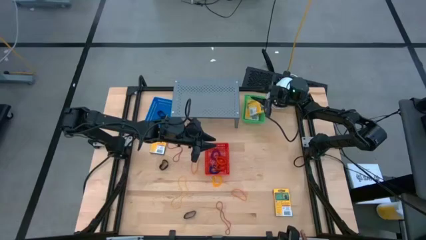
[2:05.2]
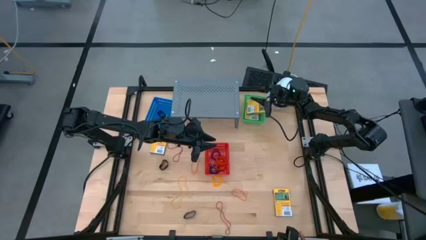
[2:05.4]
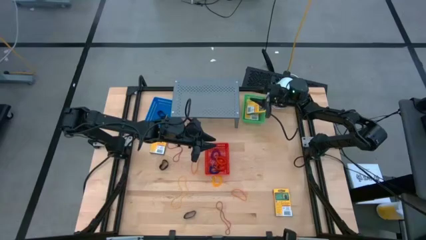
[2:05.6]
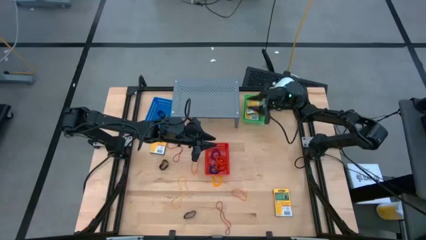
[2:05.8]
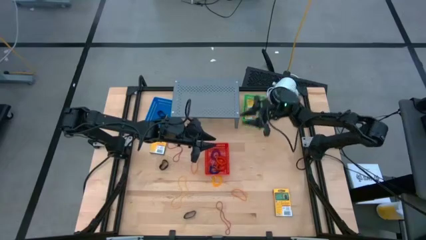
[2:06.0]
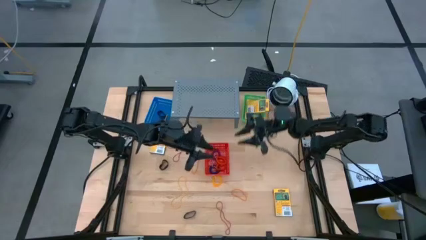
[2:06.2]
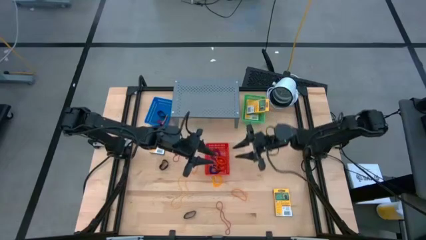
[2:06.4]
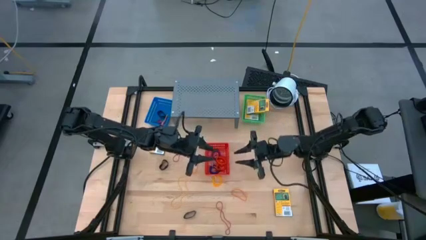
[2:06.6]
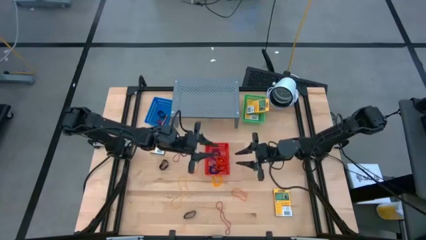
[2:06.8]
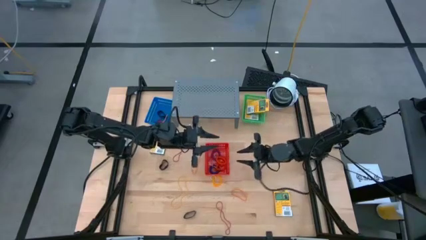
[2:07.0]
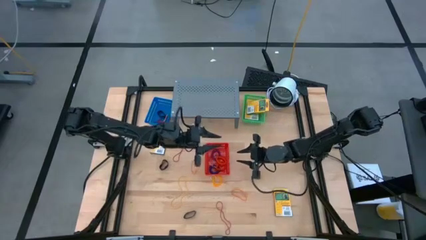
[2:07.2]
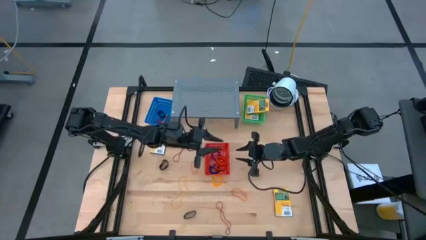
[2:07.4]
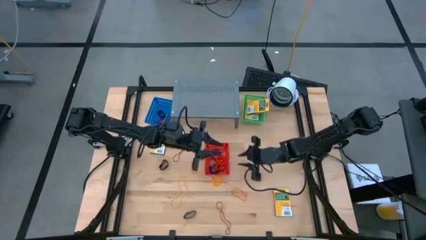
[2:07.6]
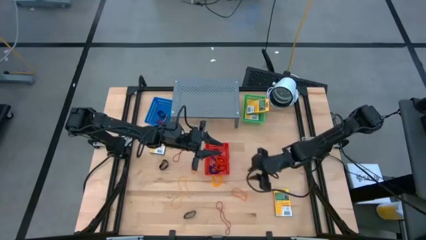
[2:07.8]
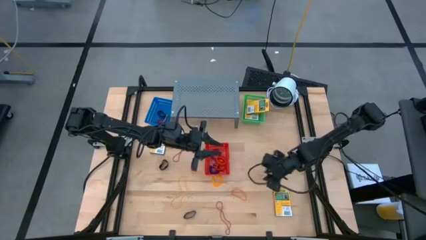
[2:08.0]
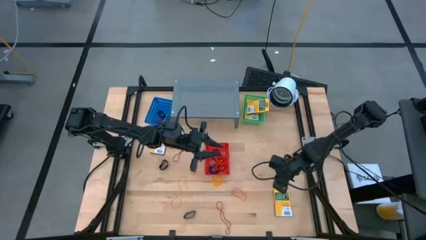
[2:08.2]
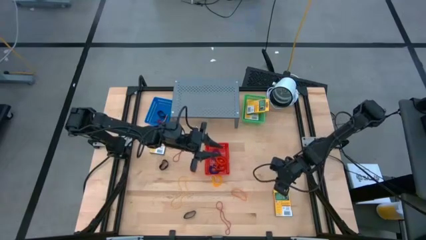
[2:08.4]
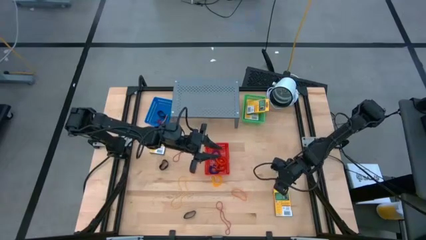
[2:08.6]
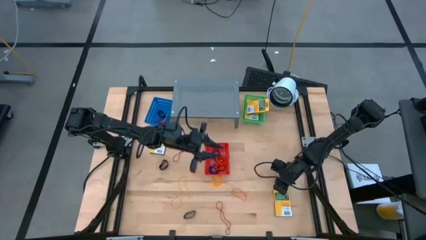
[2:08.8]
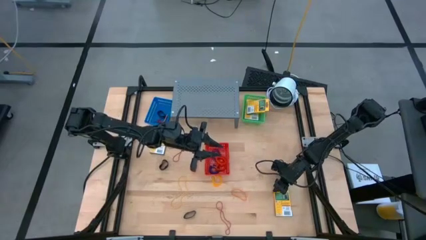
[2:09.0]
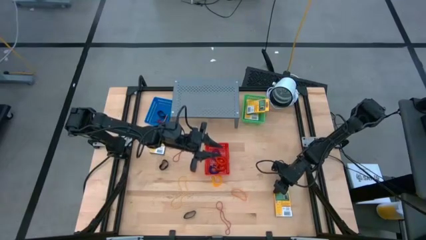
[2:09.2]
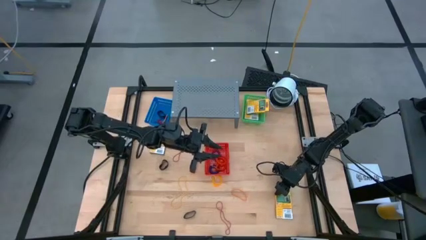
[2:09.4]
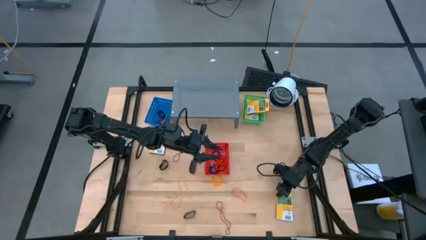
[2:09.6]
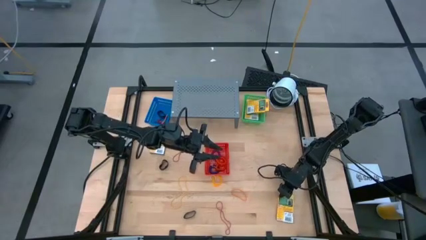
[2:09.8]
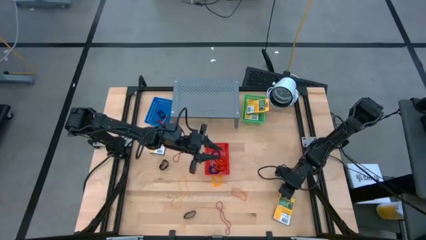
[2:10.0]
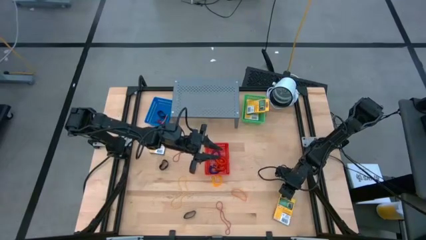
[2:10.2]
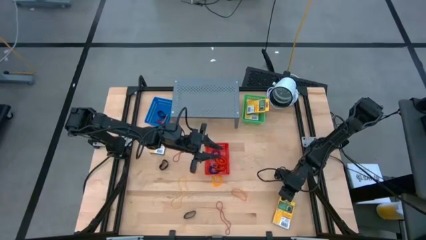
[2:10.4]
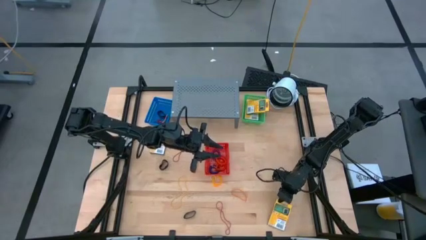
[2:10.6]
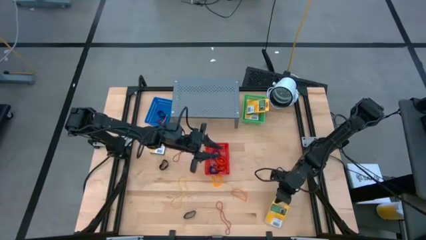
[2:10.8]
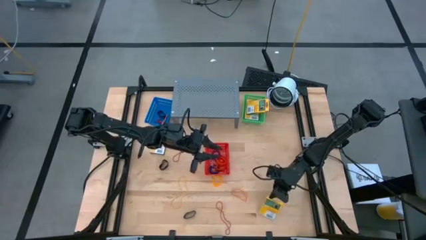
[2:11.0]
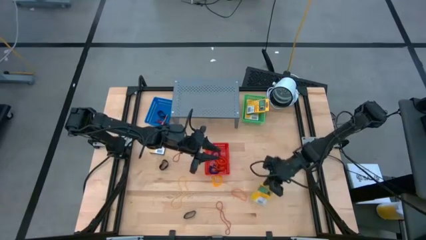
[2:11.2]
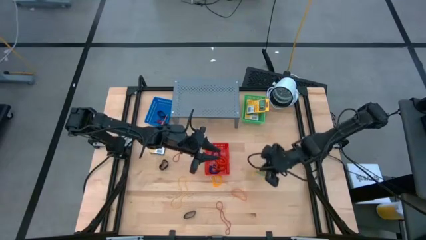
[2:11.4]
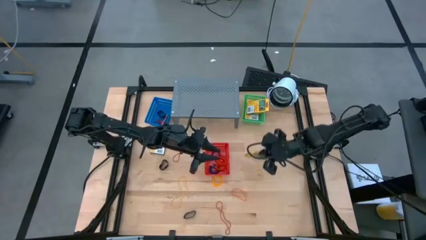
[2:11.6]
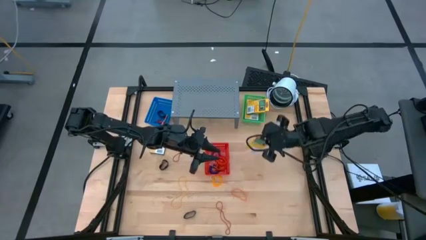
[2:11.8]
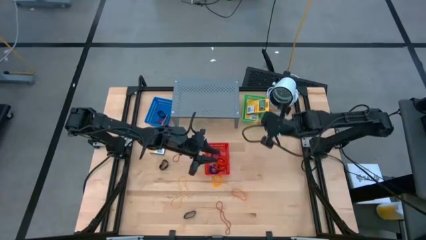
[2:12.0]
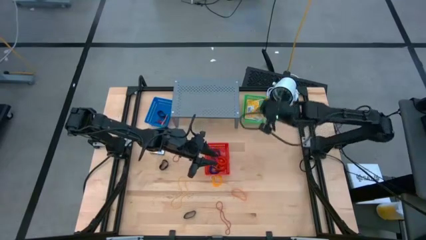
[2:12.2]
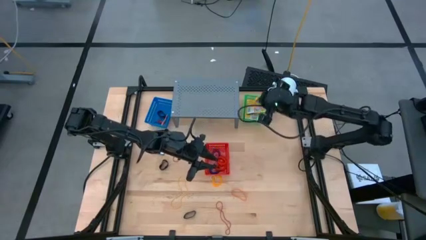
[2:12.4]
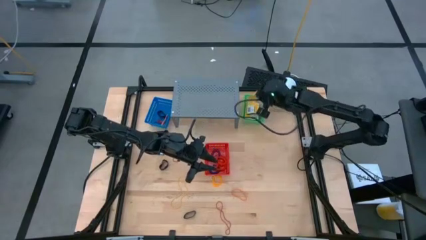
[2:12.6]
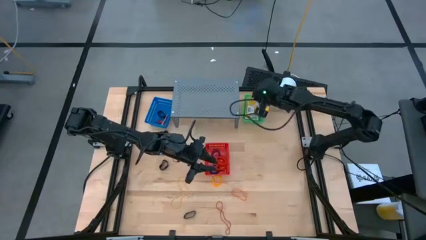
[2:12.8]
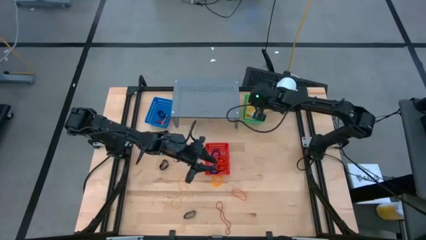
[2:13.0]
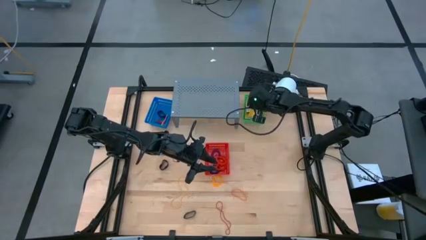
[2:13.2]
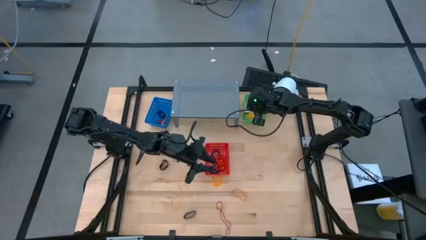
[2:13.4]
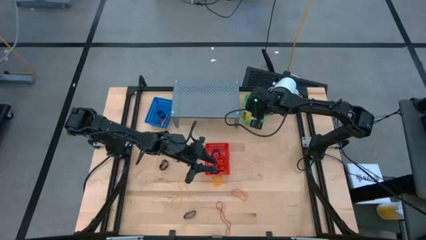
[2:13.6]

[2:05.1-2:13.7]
Task: Pick & Place Office Desk Supplies
Put the bottom right yellow crayon box into the green basket

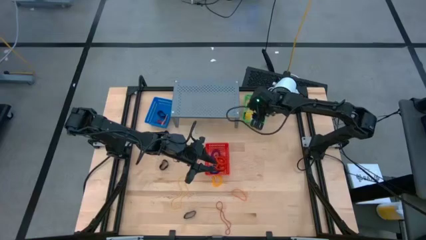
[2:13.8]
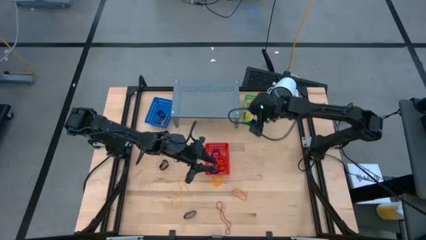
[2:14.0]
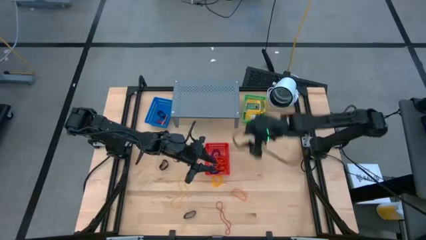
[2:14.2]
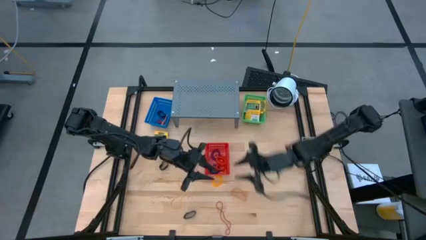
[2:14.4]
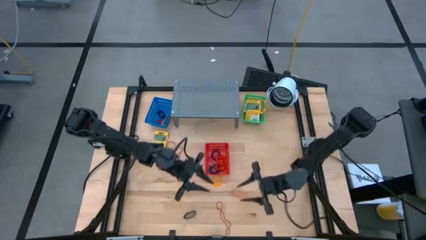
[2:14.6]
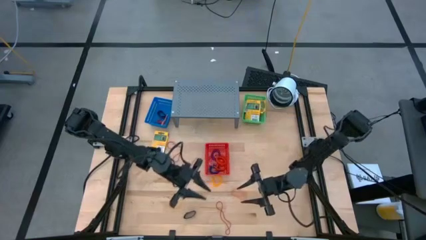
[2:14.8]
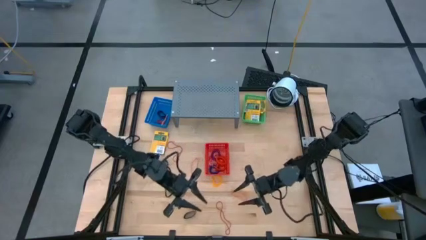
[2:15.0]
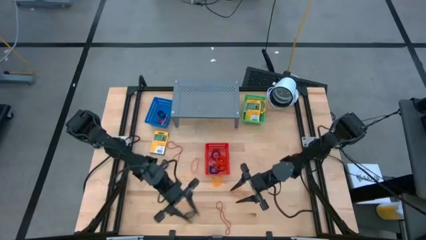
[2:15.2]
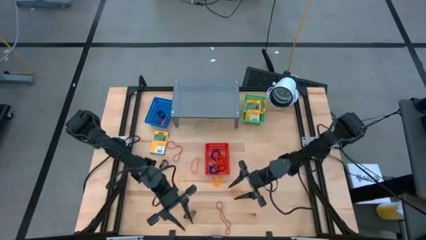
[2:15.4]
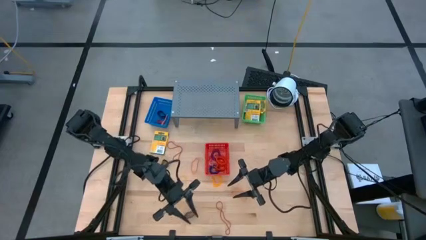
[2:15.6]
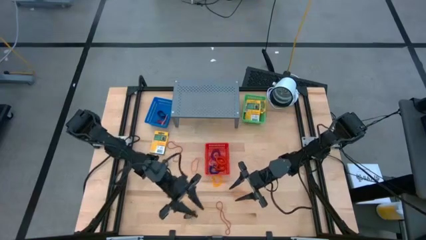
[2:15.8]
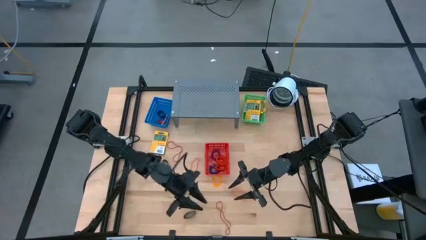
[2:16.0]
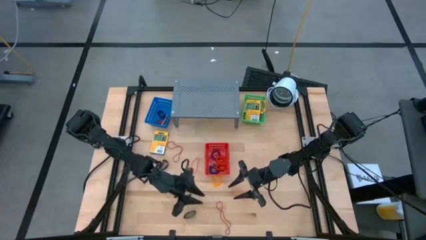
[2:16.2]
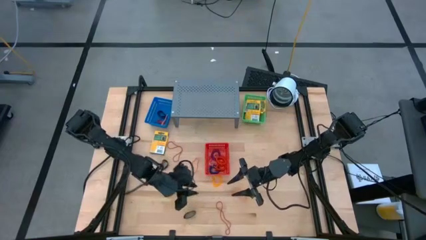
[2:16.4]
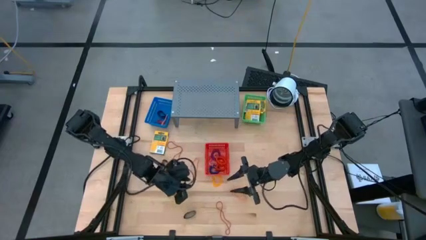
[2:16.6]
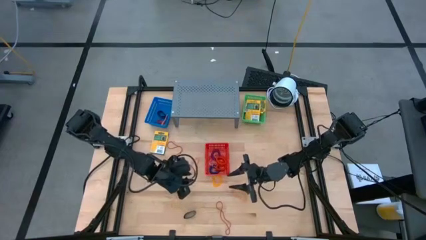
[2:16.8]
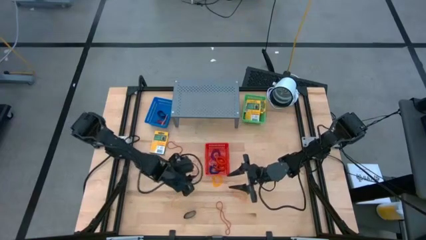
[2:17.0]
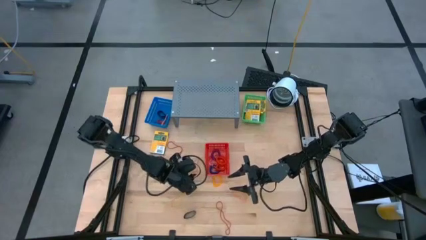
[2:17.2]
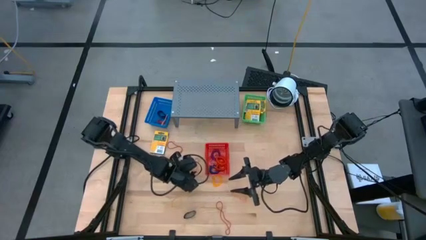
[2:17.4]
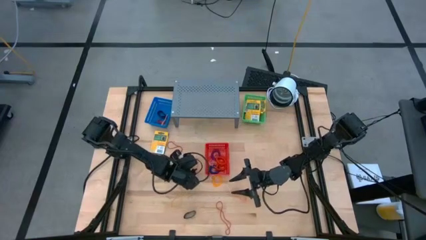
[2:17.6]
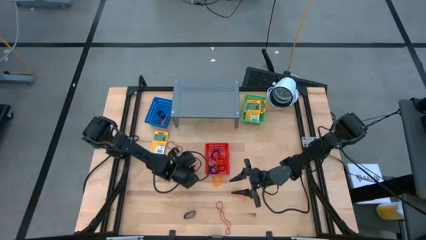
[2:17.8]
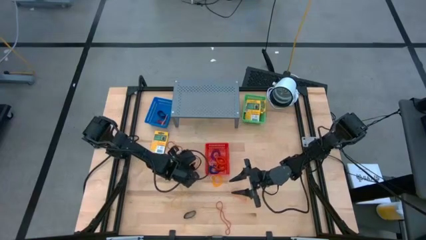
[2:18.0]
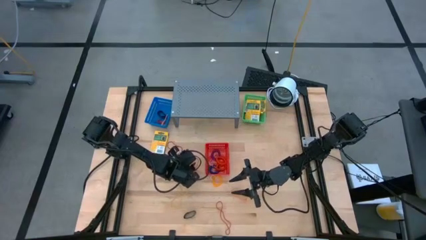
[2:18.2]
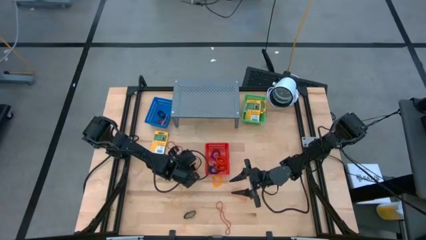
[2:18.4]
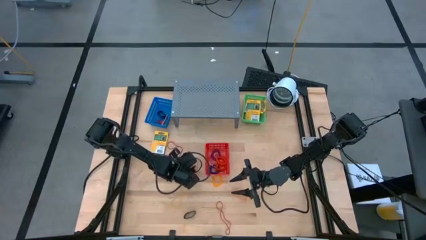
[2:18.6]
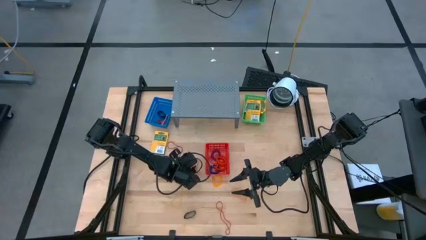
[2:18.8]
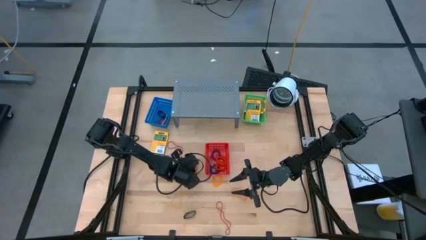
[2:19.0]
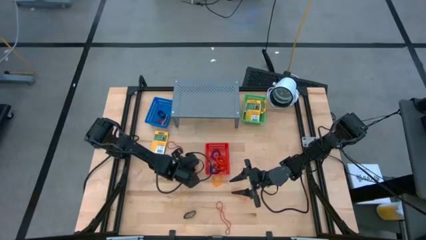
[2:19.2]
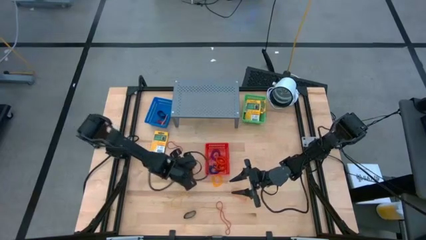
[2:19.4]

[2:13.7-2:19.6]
Put the top left orange rubber band into the blue basket

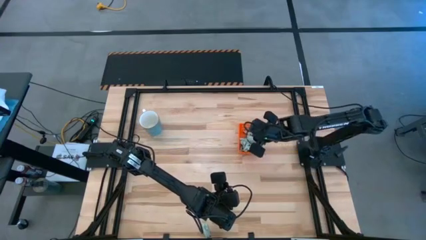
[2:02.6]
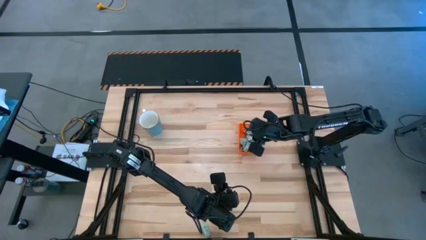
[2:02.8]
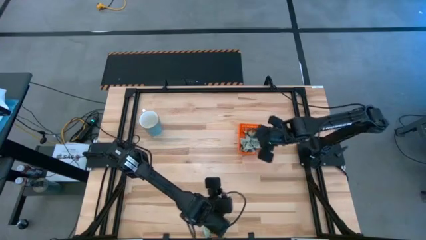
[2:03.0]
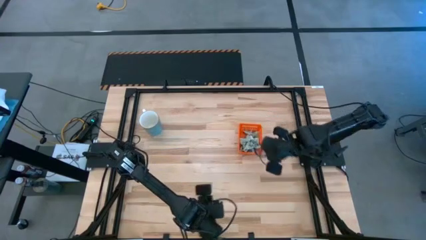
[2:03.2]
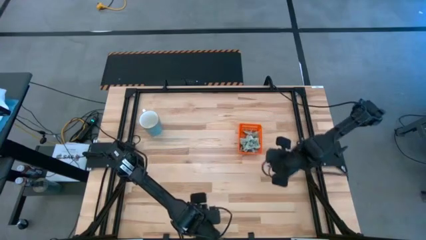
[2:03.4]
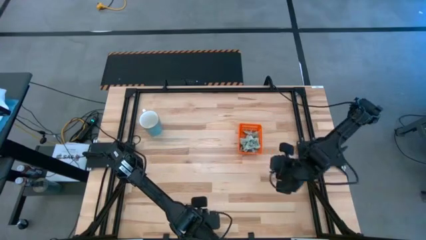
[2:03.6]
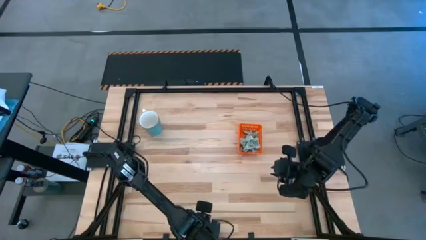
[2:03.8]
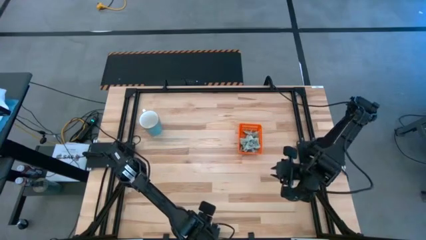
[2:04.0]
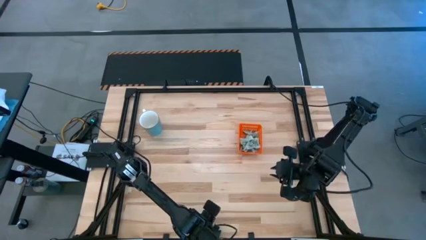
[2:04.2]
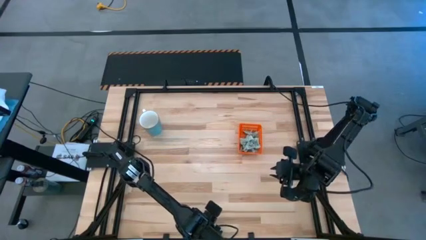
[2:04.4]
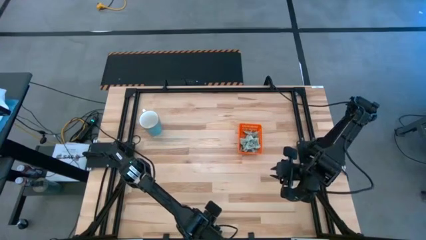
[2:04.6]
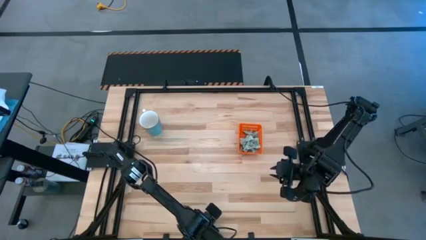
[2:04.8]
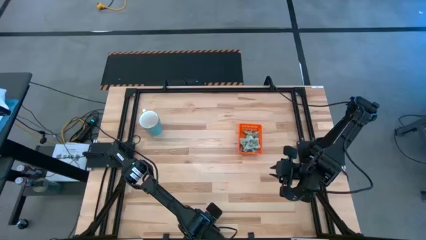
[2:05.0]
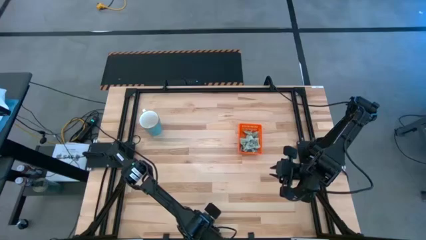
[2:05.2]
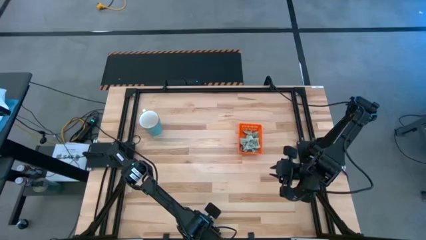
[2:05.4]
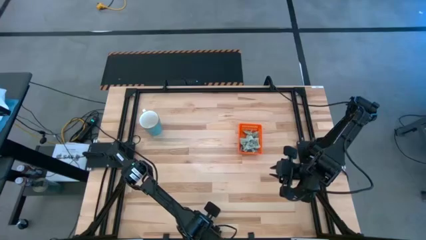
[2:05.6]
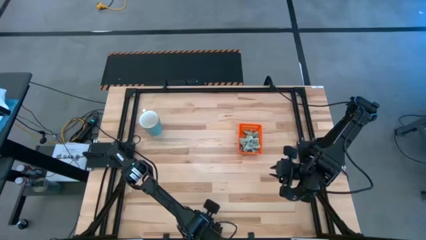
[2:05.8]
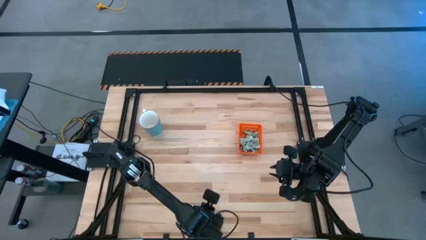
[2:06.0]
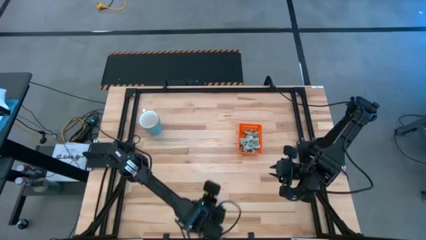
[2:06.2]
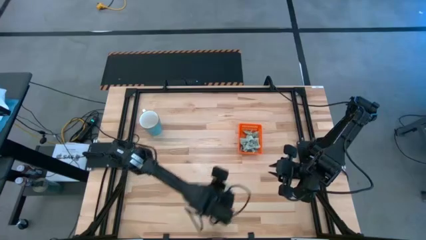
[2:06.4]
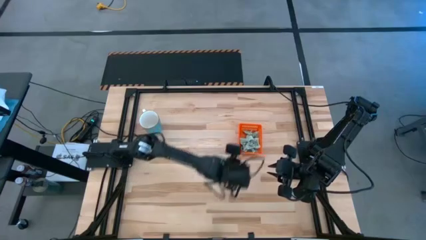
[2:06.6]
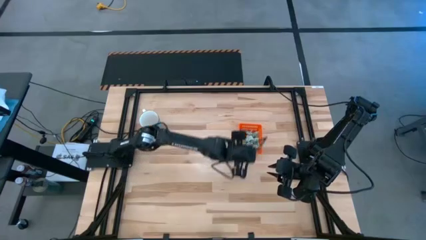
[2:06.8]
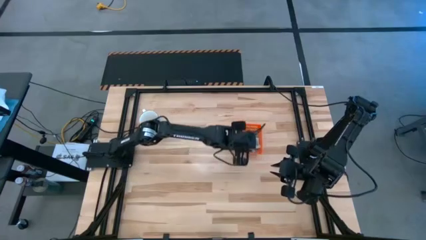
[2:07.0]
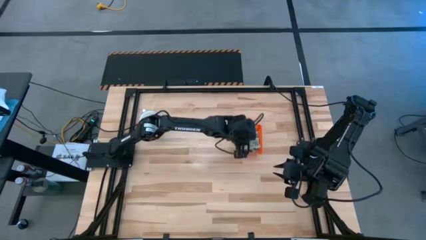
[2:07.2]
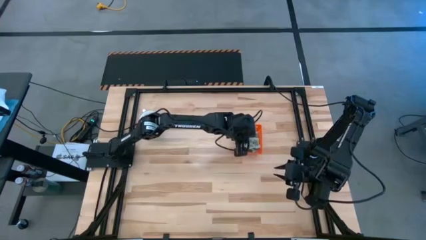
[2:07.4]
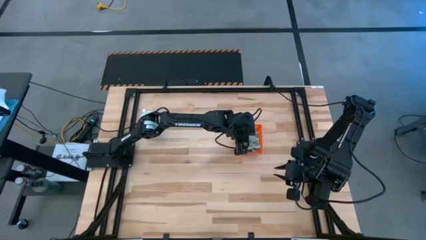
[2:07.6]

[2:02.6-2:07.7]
Task: Pick and place Stevia / Truvia into bins
Put the stevia packet into the orange bin
